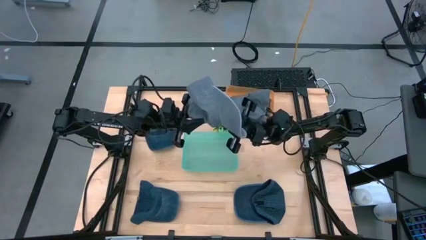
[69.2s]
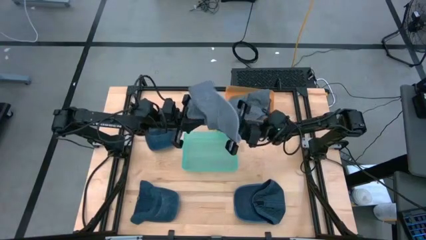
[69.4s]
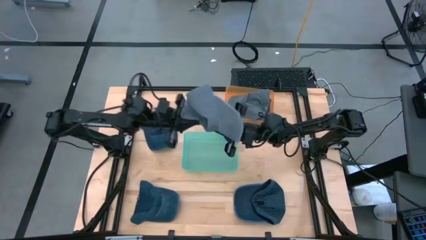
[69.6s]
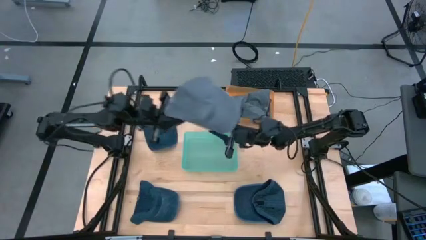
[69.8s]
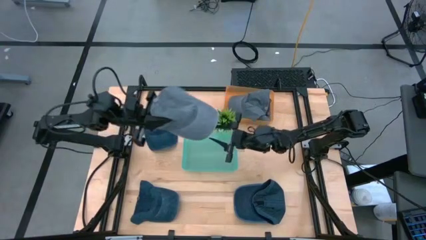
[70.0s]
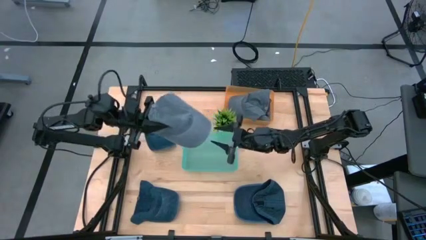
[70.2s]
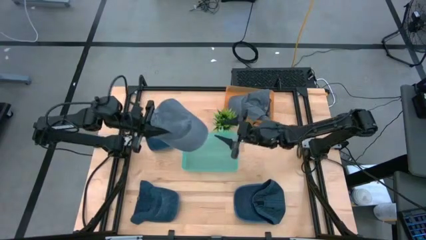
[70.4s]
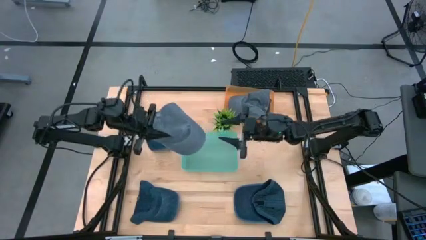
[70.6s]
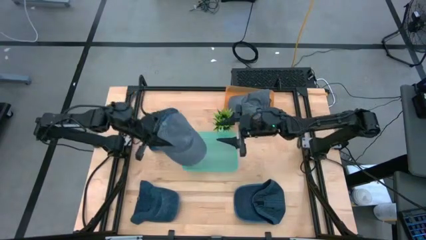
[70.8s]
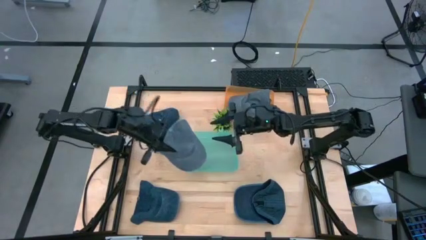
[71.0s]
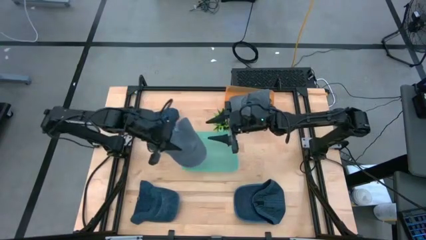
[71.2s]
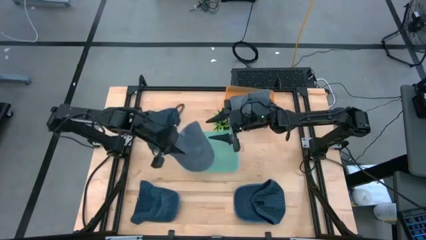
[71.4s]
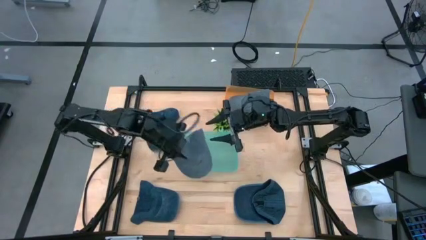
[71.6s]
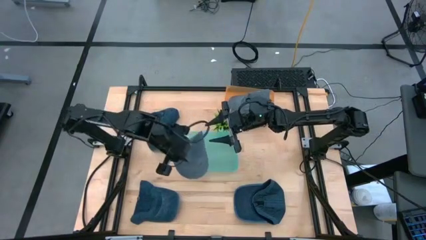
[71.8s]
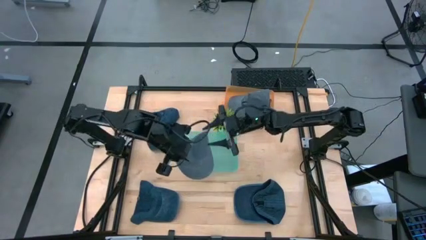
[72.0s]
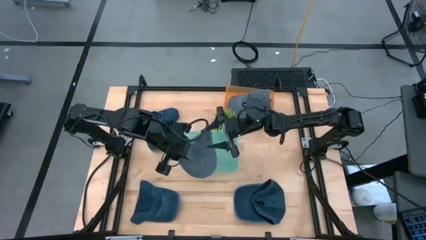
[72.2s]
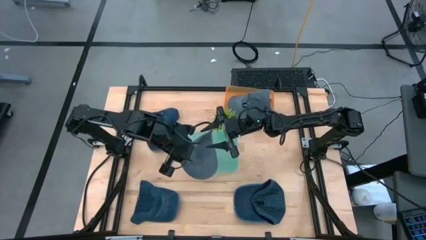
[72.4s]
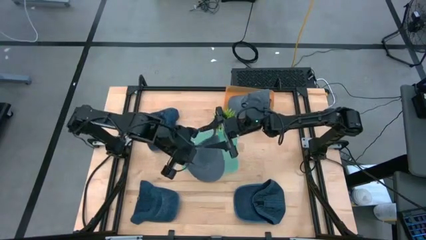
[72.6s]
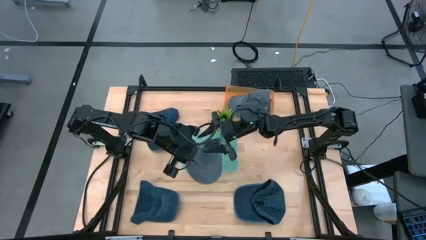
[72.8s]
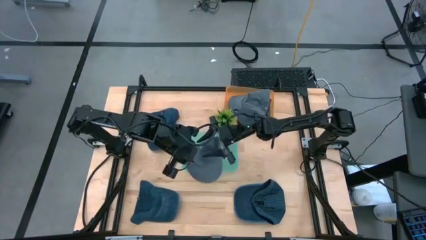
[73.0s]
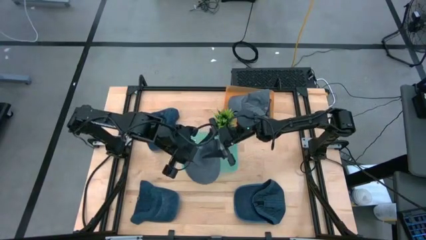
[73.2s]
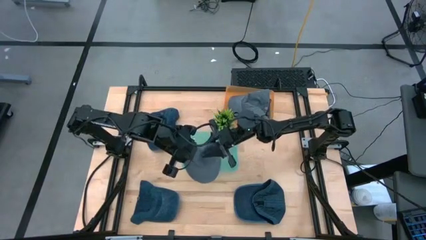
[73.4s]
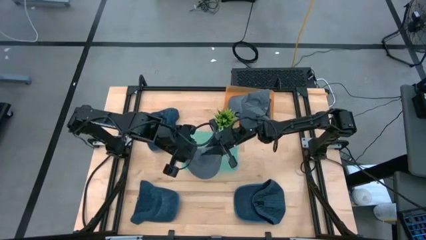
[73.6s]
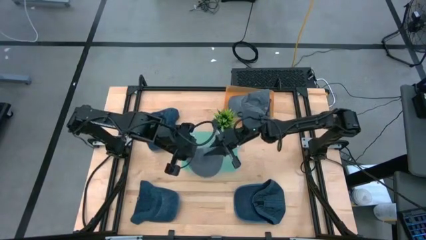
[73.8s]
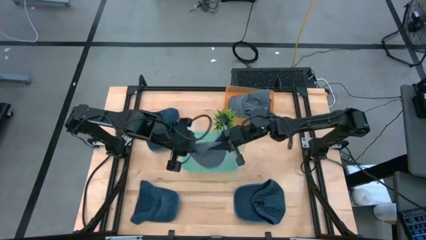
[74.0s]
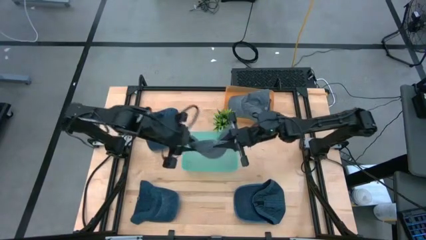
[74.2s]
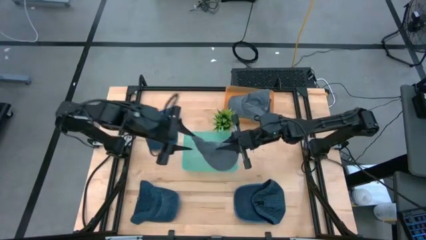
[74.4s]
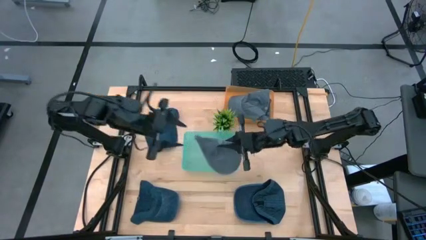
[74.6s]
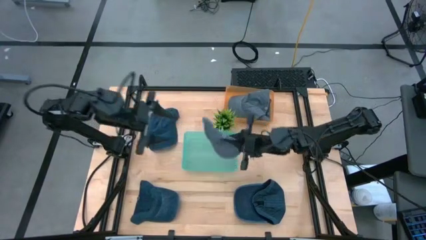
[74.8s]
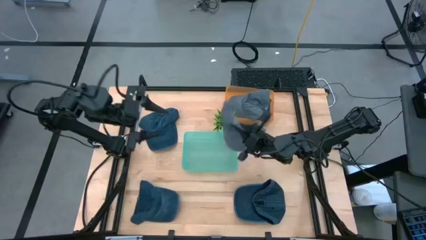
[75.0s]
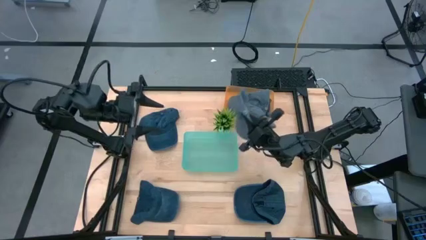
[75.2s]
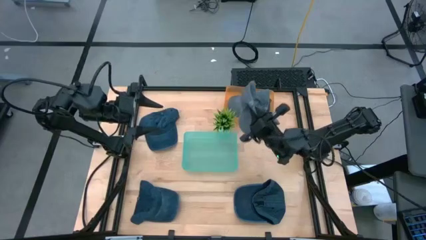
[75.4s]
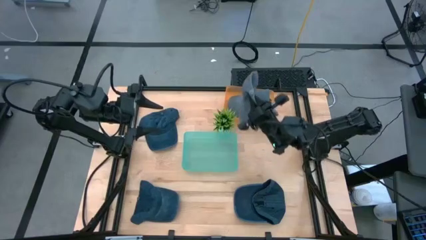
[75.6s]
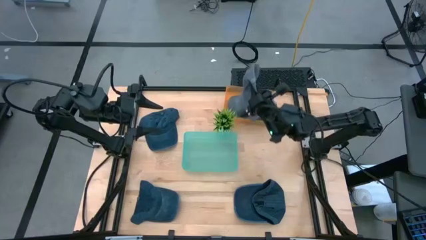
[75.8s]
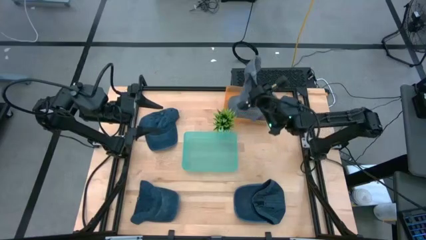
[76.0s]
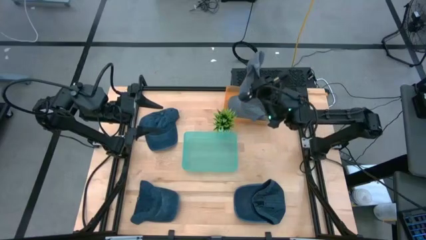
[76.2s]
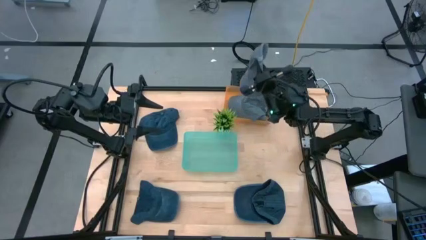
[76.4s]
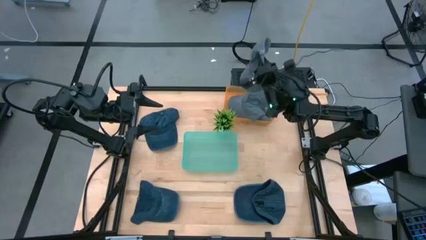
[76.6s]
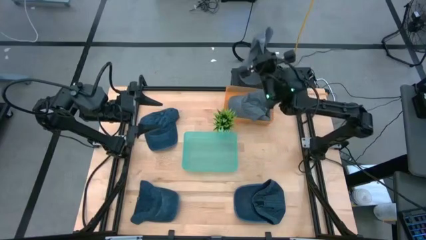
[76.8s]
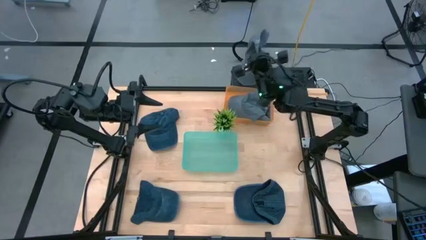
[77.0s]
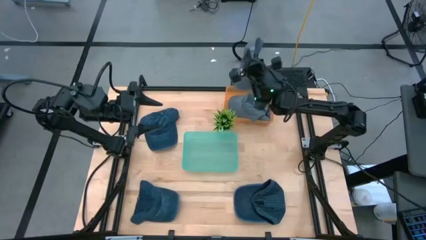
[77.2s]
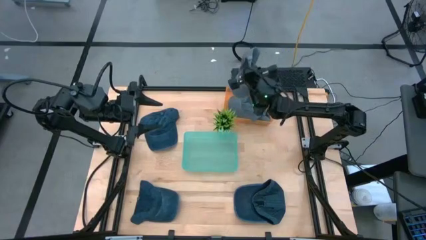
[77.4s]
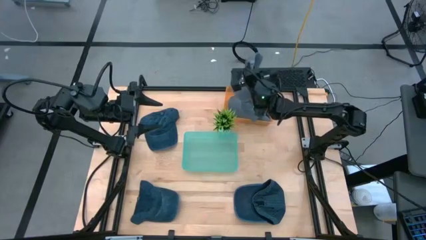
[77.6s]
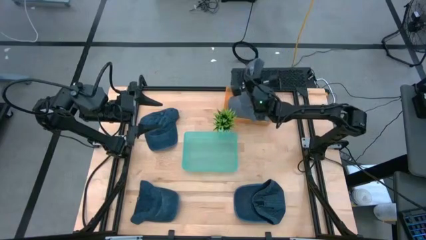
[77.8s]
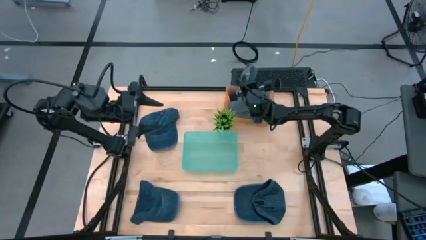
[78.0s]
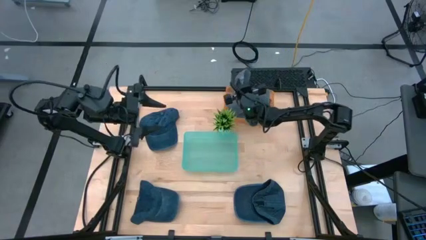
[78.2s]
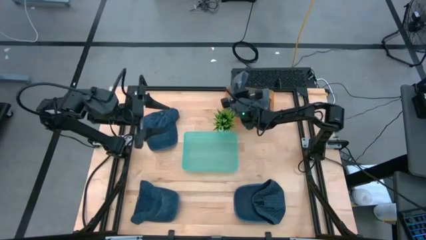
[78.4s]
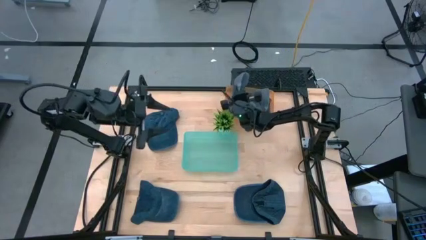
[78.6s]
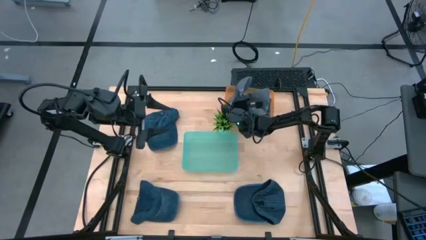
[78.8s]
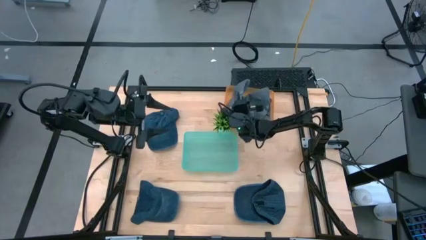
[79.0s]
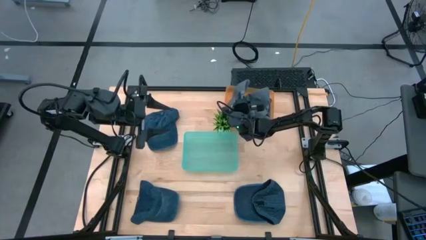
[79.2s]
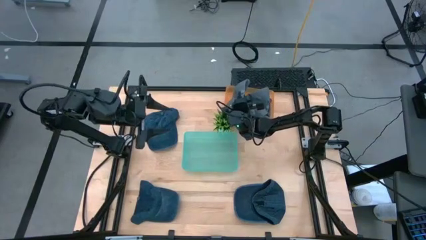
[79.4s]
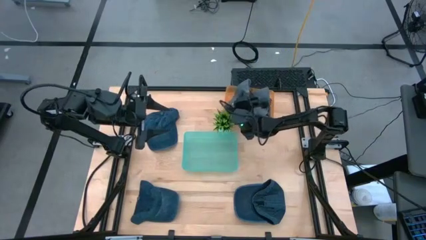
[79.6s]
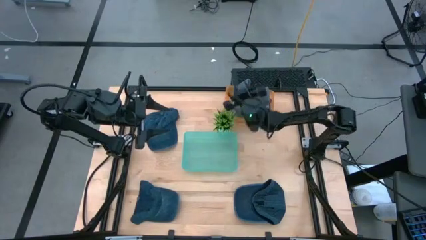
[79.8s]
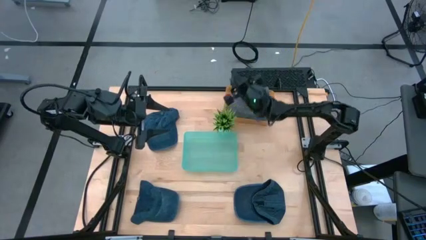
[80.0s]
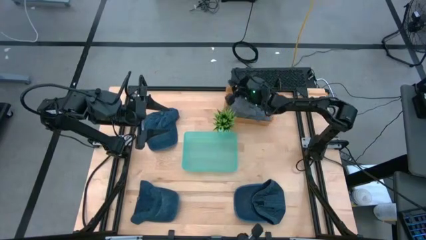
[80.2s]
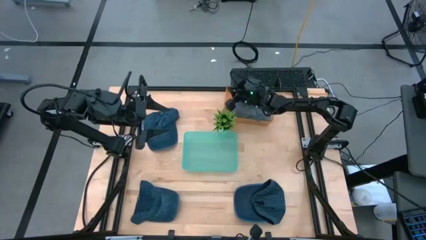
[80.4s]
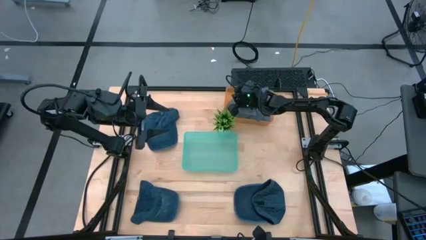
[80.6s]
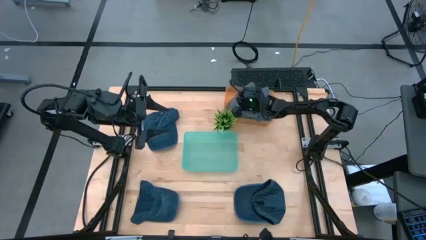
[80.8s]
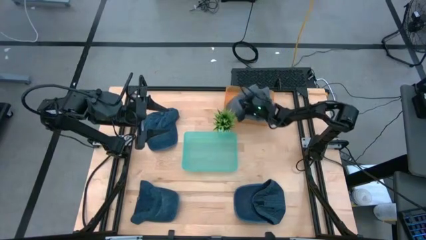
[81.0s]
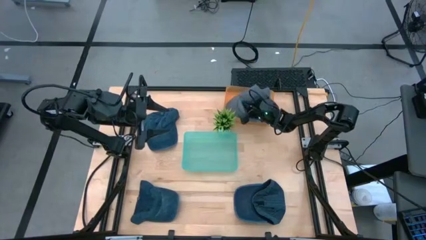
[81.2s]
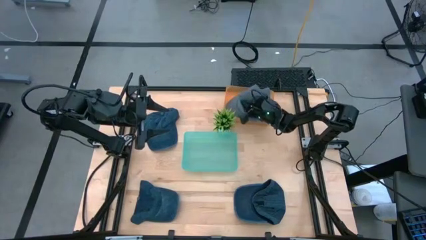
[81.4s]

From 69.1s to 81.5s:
Task: Pick & Place hat
Put the gray cap into the orange bin

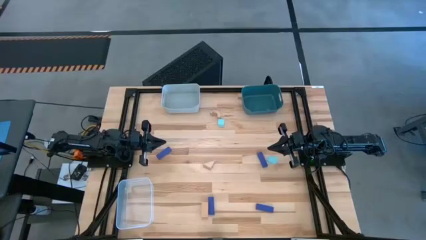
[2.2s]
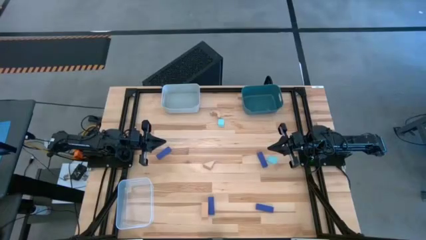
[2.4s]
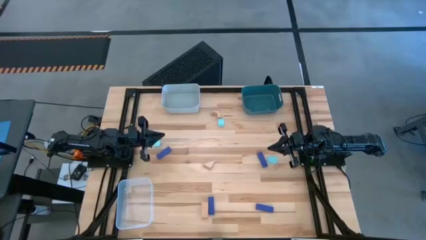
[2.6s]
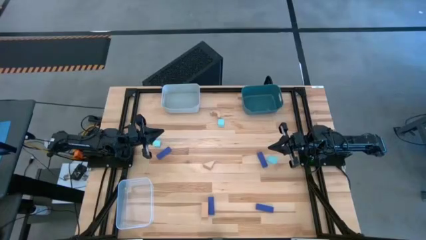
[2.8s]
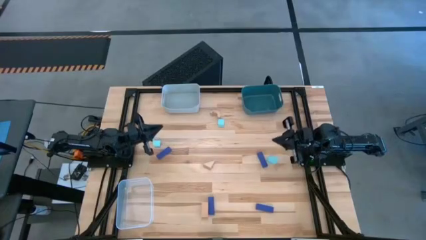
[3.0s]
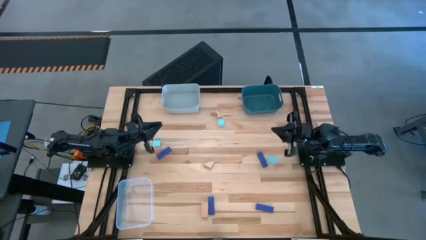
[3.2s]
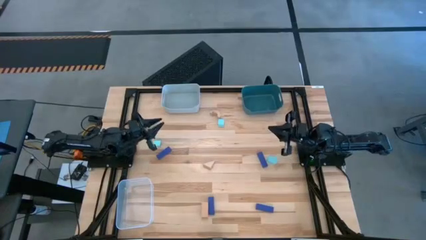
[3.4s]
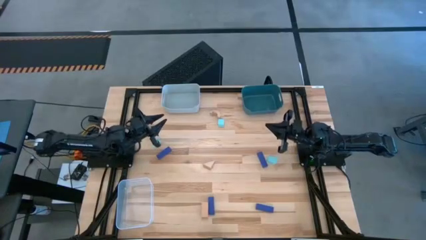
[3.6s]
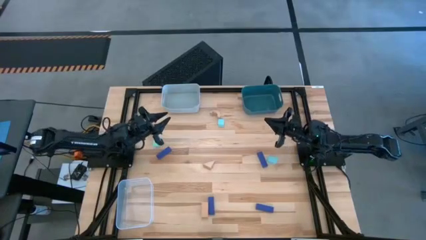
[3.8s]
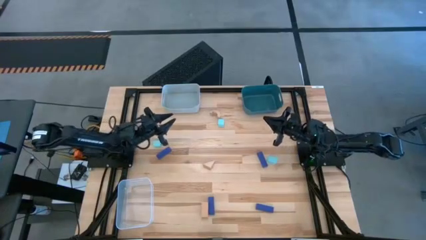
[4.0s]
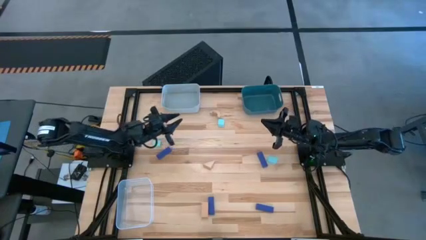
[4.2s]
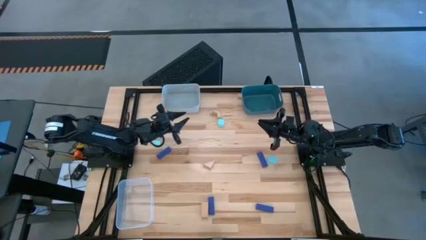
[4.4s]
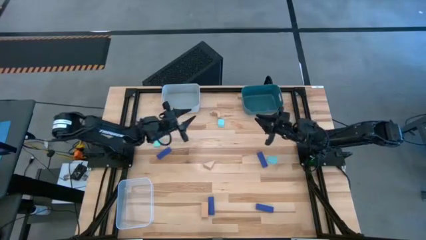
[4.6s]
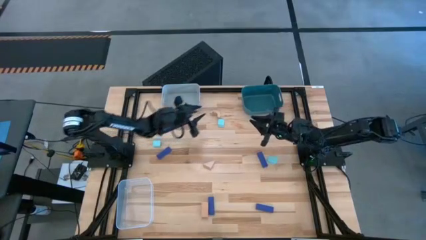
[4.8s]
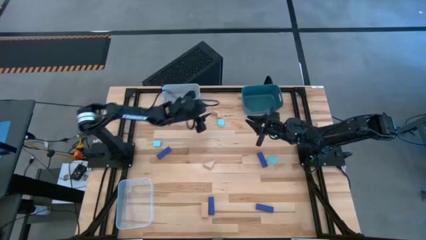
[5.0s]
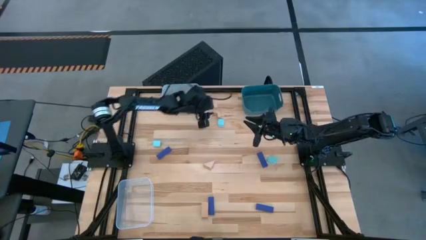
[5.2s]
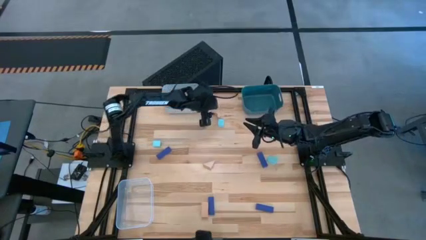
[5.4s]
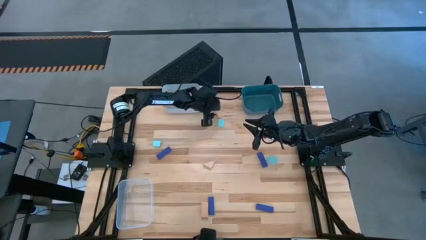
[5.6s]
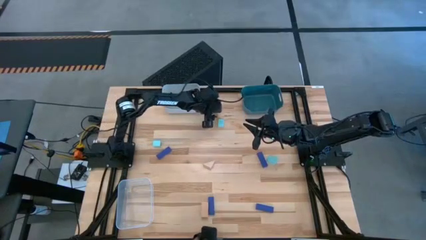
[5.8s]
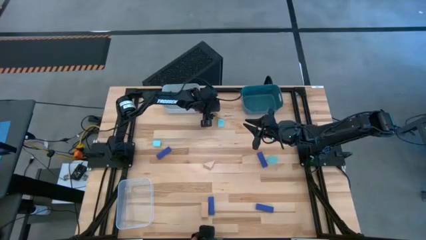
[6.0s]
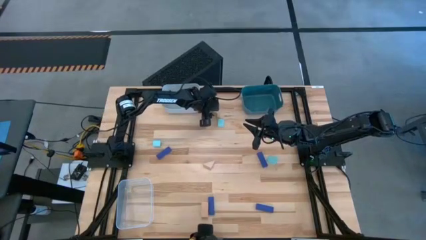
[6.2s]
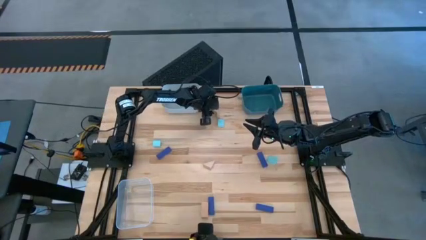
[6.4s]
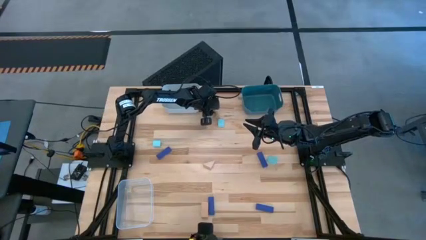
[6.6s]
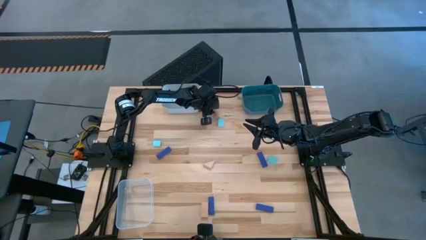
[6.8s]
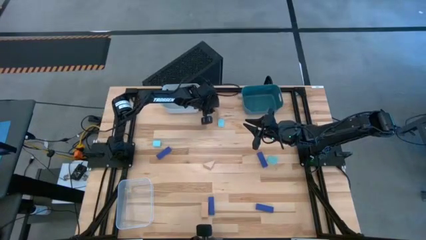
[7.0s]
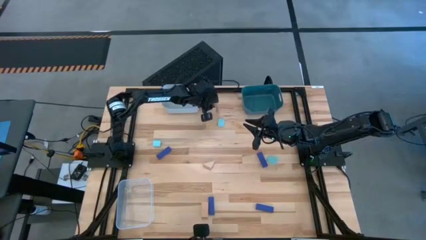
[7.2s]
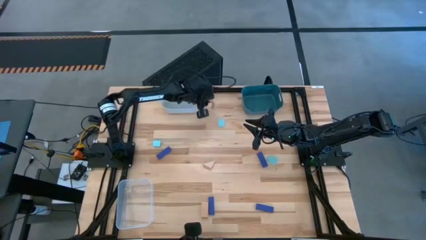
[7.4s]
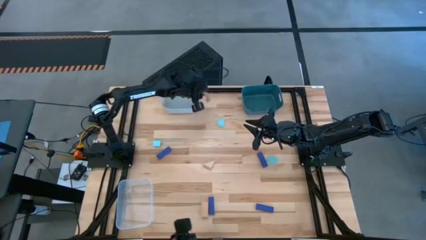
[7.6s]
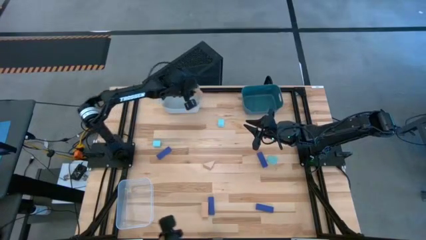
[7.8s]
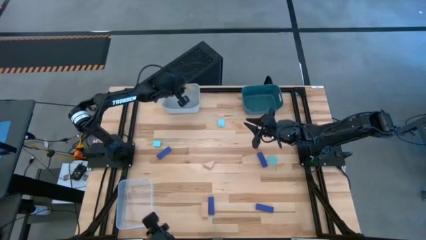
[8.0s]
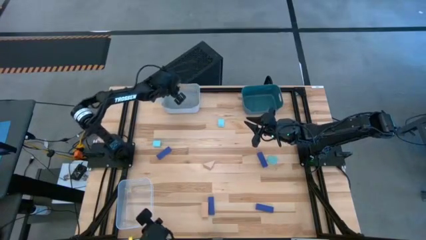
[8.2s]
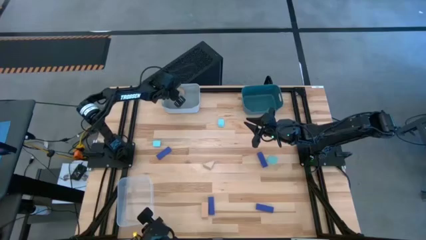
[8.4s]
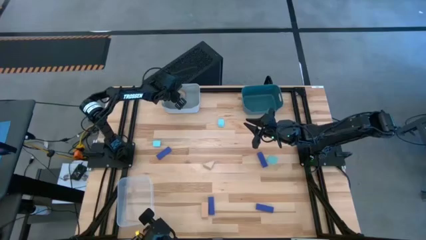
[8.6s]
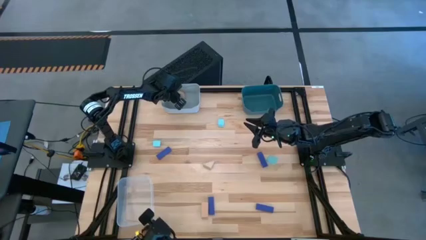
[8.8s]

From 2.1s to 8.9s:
Task: Sort & place blocks by color
Put the brown block into the gray bin
